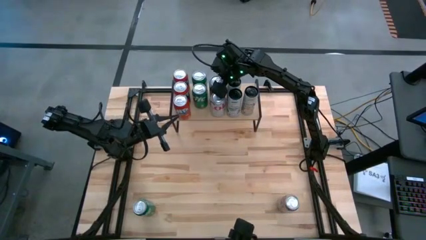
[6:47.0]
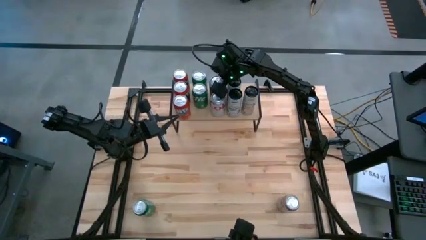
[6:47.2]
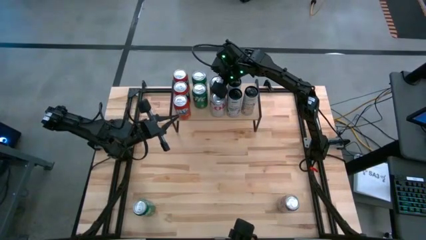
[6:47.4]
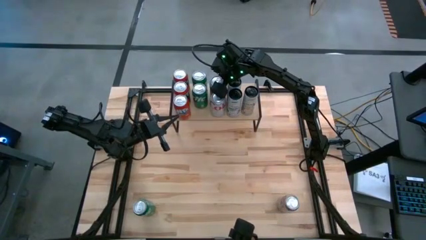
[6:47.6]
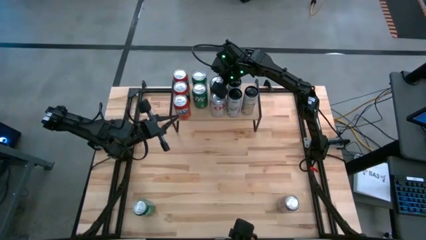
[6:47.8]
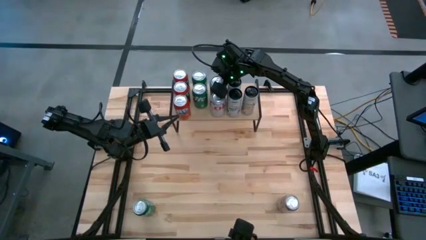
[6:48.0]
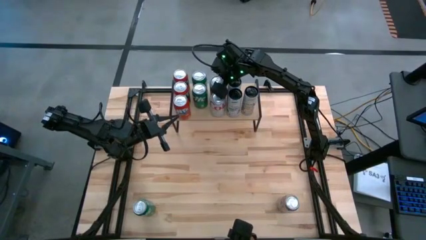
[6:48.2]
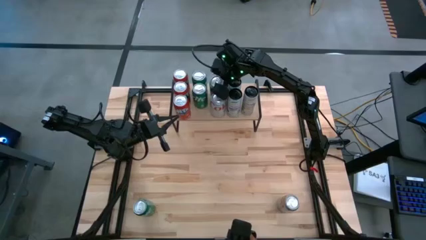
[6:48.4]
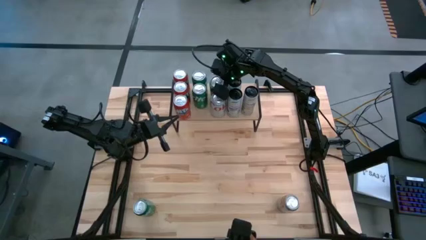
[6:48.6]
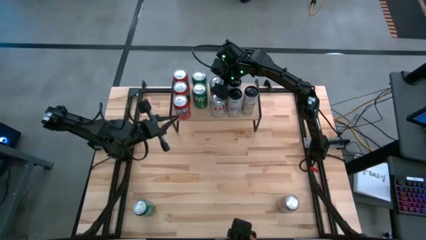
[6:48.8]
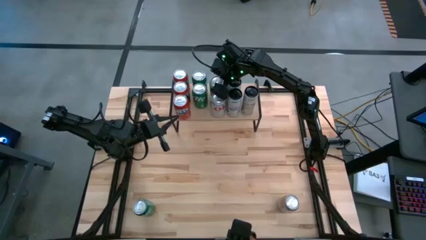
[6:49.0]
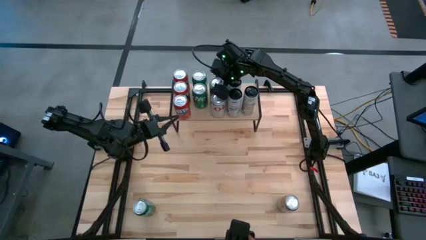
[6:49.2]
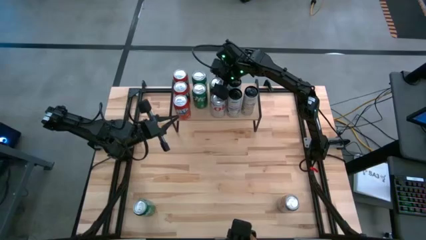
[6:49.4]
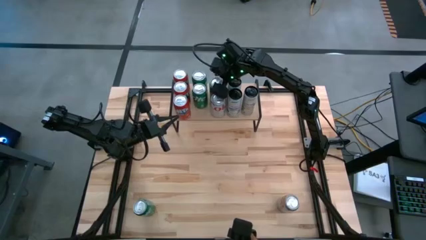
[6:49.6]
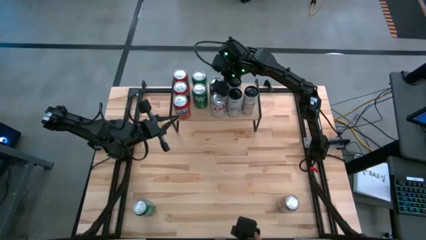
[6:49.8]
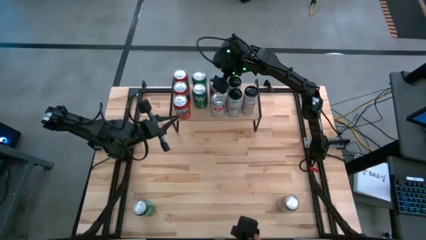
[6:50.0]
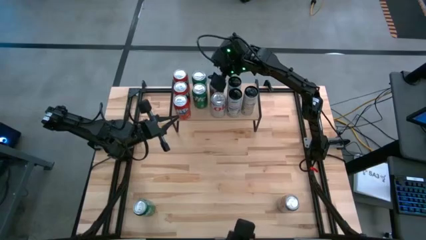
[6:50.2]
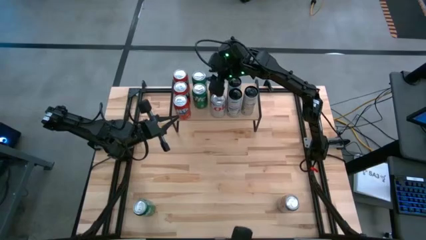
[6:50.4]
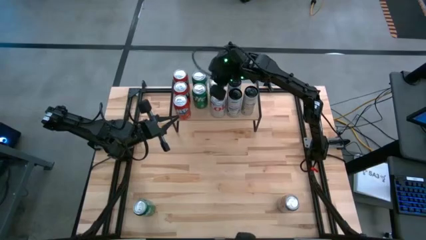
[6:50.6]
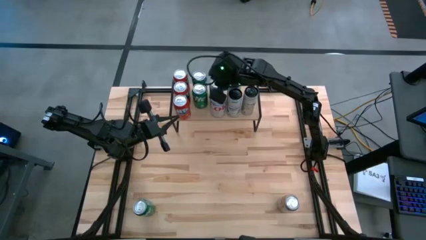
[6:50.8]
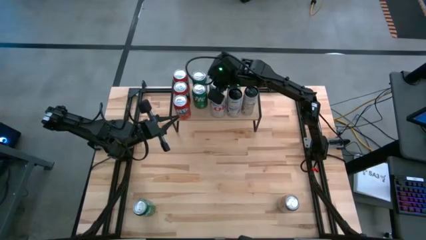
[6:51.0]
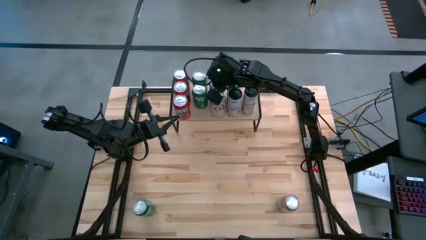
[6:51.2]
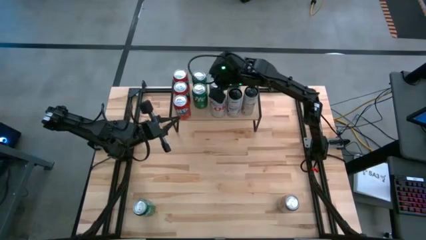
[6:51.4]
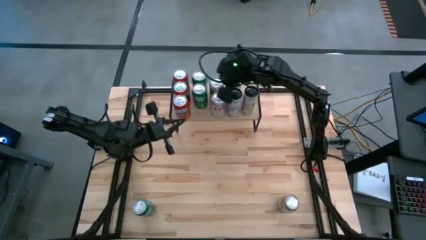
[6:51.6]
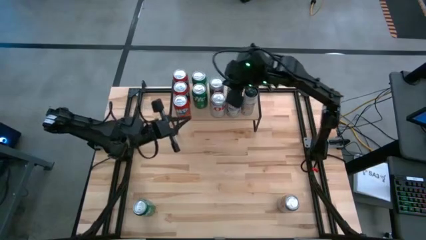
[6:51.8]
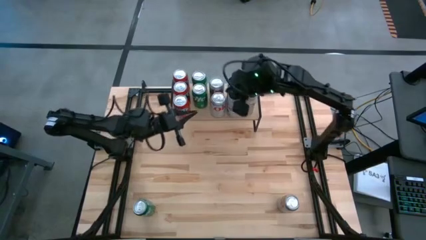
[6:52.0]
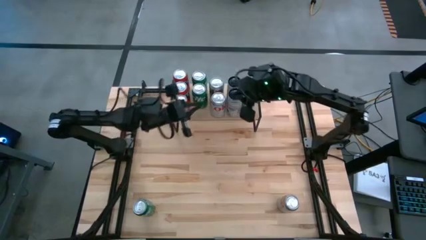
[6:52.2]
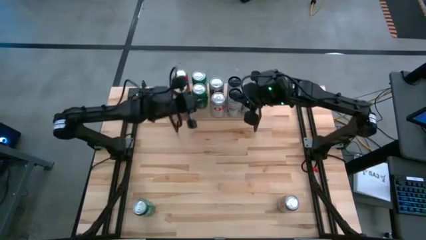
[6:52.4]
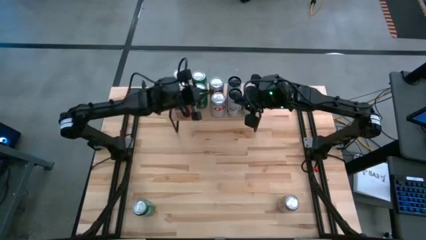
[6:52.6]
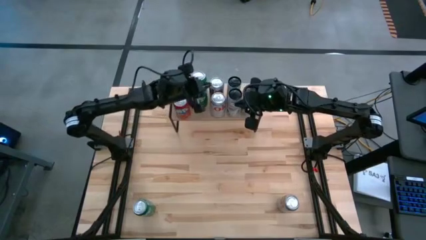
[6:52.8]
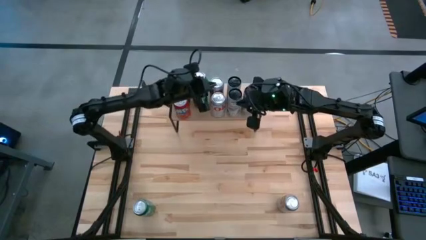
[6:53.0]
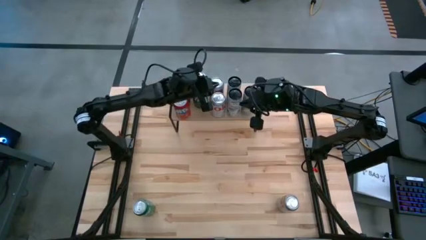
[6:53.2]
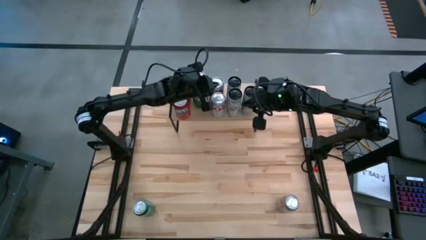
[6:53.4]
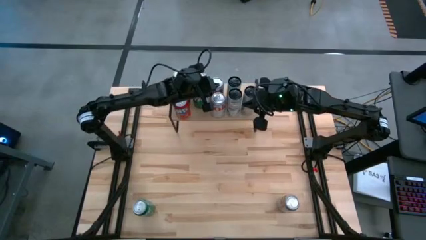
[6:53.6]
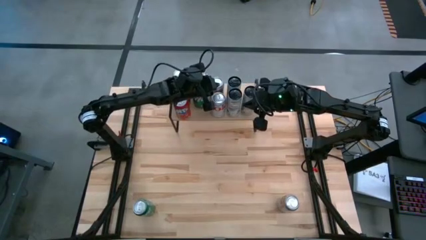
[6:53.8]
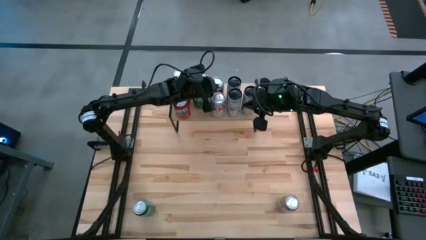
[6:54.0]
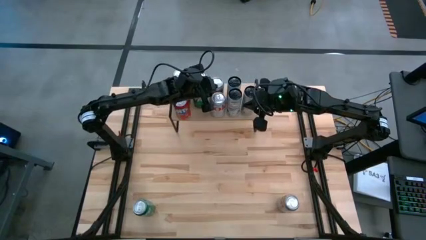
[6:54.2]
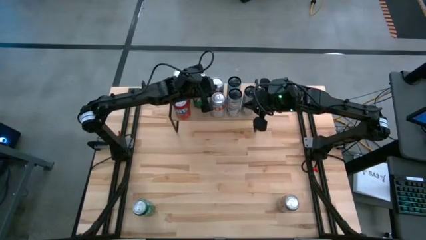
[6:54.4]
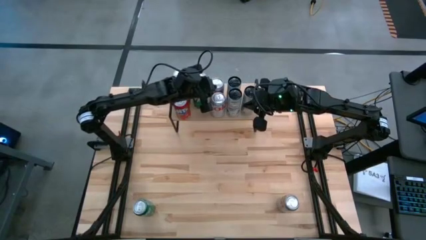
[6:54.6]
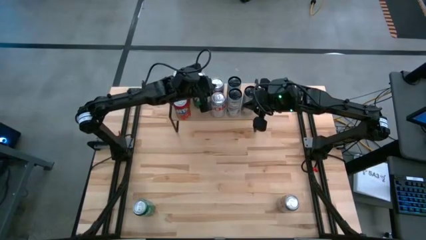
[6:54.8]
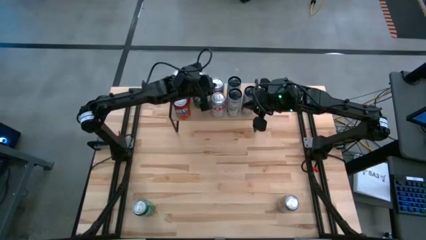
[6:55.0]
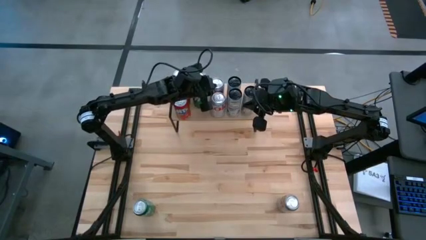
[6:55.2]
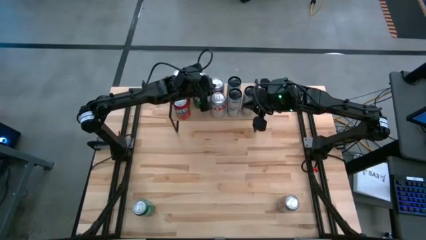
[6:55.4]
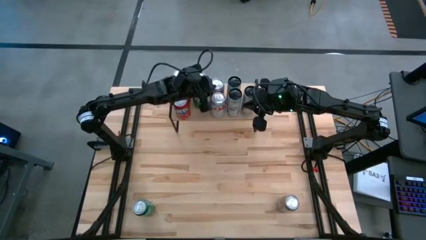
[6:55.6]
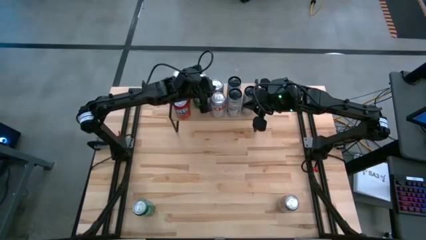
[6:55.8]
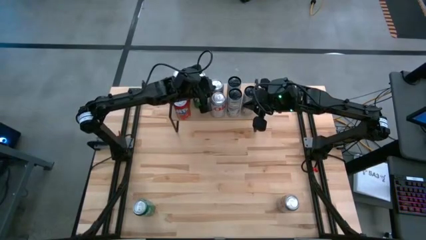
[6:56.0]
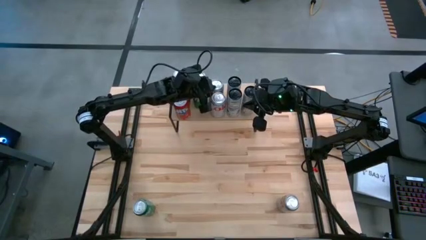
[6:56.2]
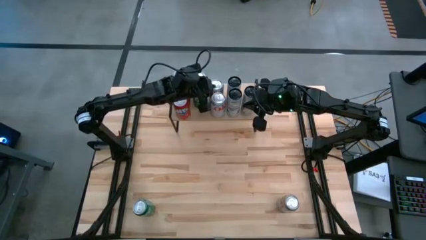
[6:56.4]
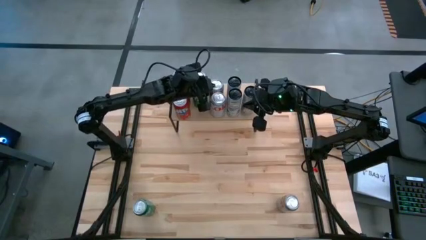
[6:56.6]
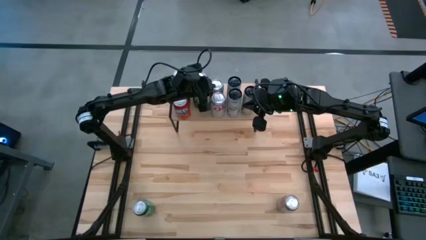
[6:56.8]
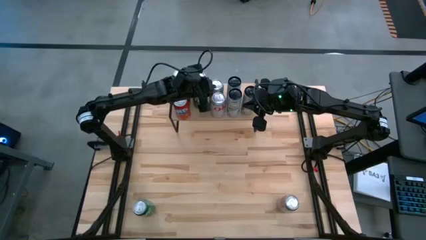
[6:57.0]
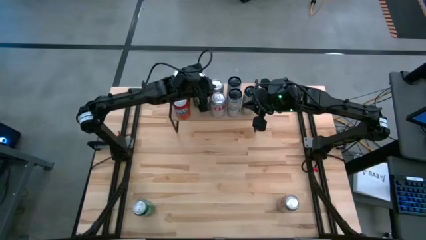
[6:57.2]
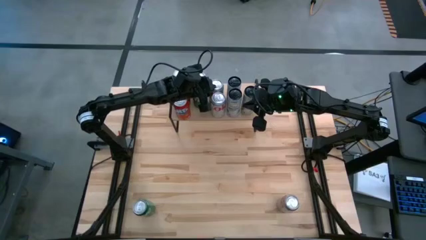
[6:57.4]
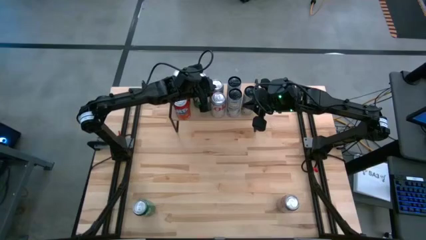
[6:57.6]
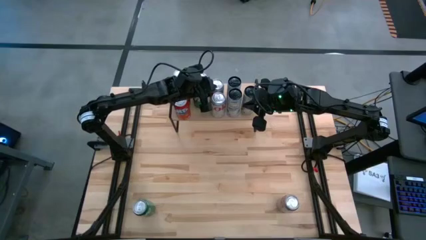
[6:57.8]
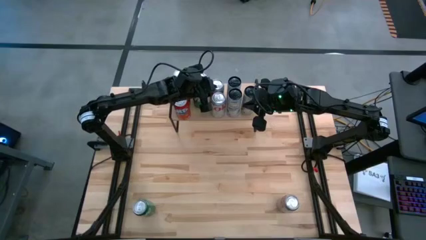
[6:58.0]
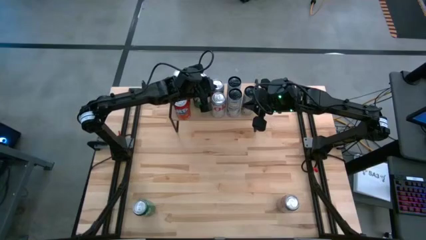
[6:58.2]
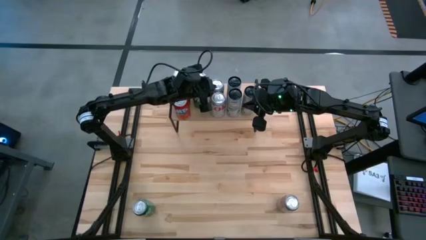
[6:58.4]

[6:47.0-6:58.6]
Task: Place canned beverage on shelf
Put the left silver soda can on the shelf aligned with the other silver soda can

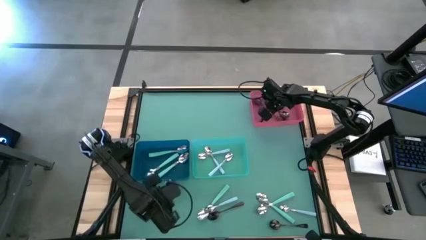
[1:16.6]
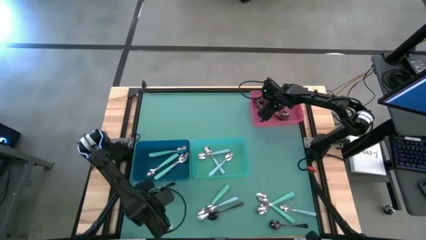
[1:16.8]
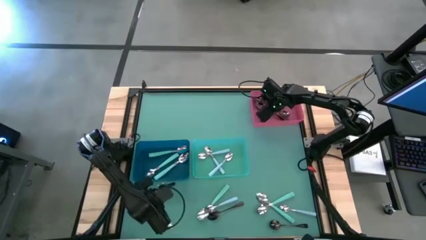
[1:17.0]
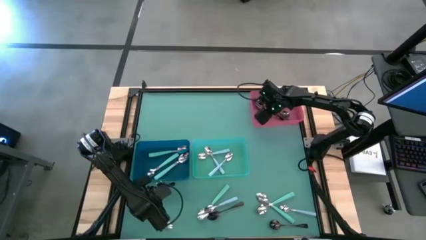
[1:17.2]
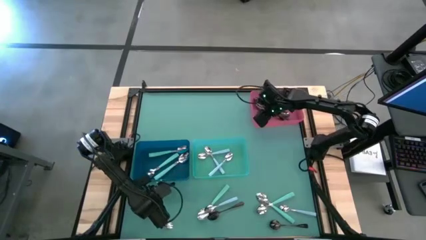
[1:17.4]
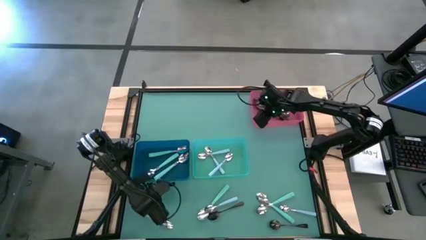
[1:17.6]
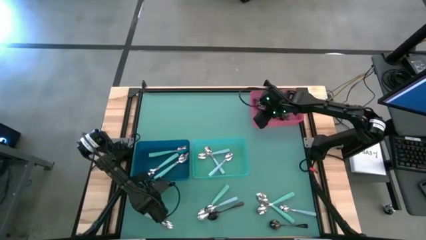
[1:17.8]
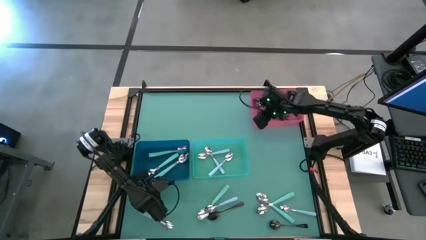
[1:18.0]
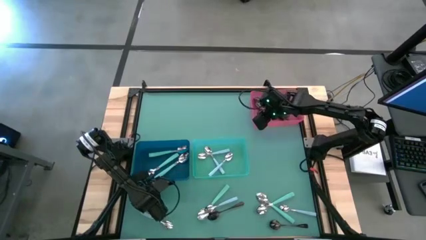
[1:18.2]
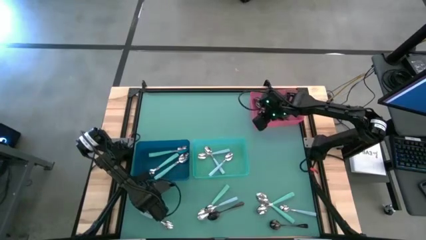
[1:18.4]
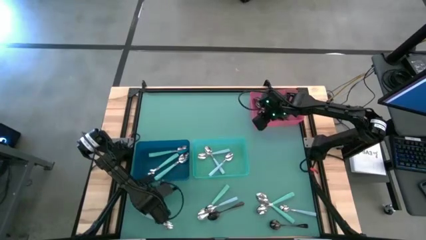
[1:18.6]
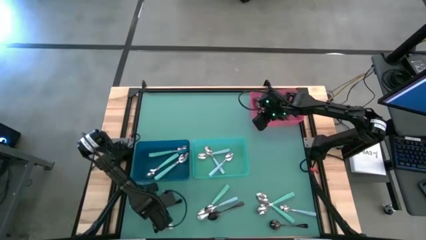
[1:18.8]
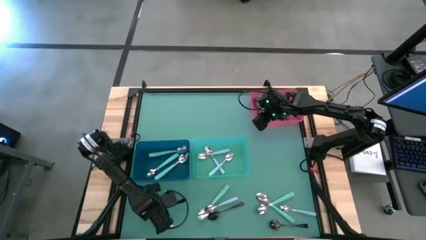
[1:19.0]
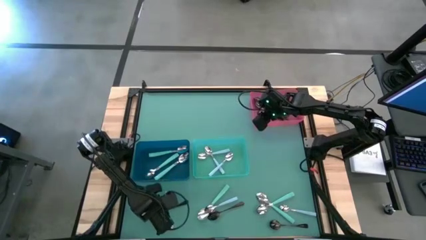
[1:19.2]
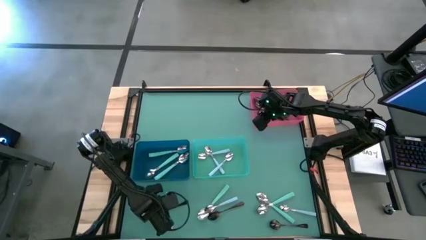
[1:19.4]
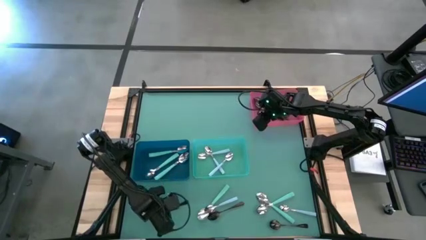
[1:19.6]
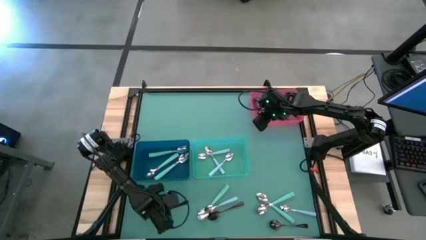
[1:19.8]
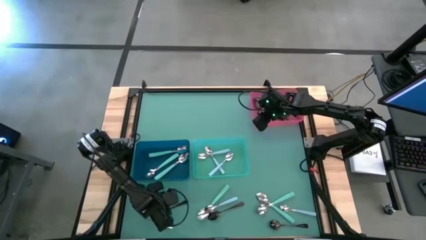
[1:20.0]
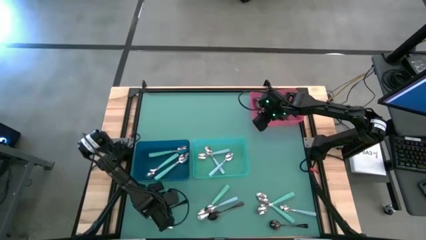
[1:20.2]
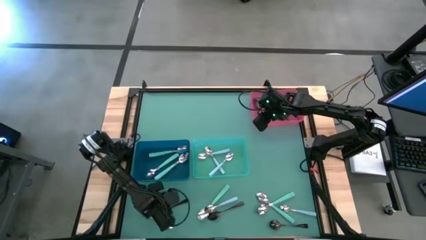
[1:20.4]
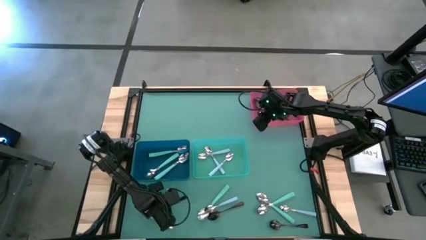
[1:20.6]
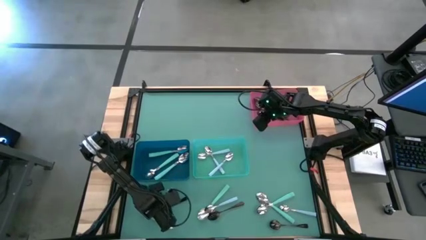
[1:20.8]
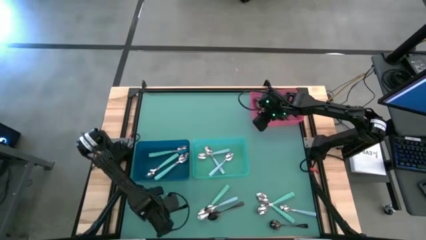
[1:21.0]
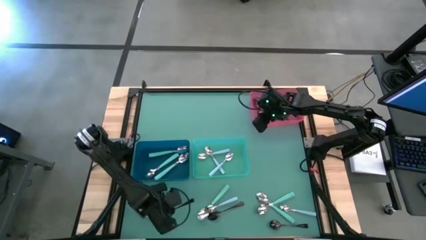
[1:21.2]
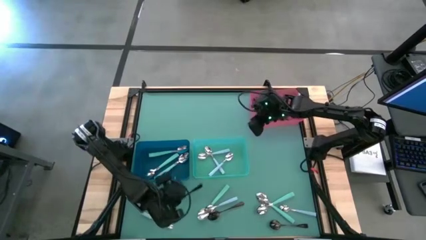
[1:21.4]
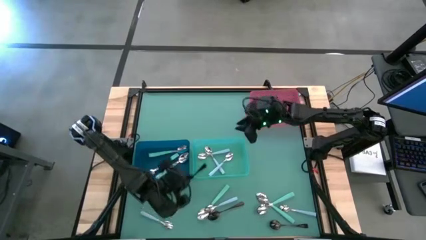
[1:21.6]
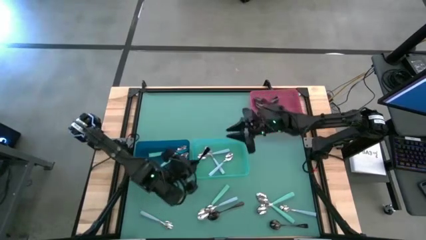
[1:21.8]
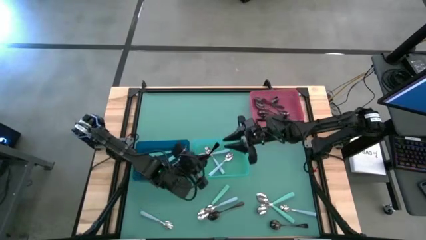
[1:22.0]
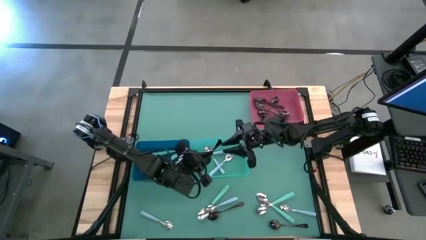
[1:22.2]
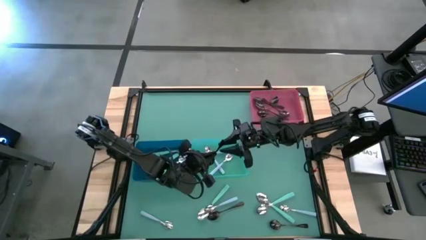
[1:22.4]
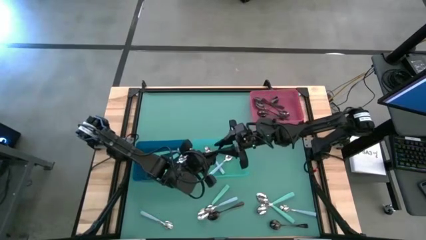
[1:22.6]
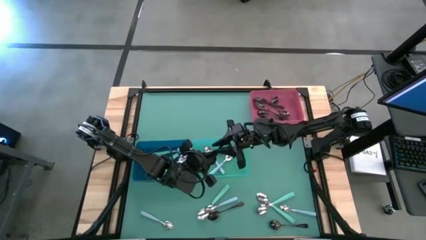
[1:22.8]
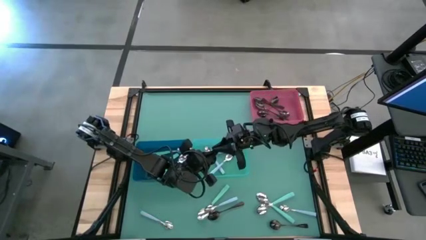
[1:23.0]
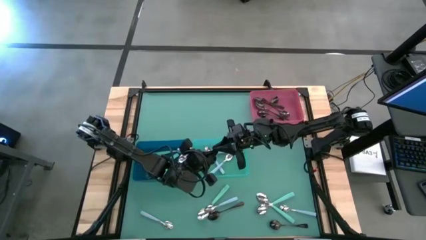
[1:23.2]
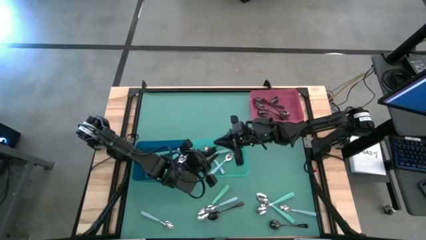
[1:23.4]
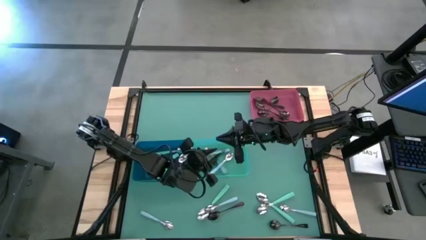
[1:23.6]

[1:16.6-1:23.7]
Task: Sort silverware by color (type)
Put the black spoon into the pink bin
